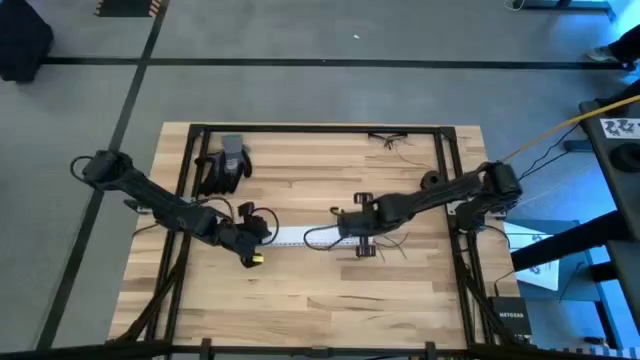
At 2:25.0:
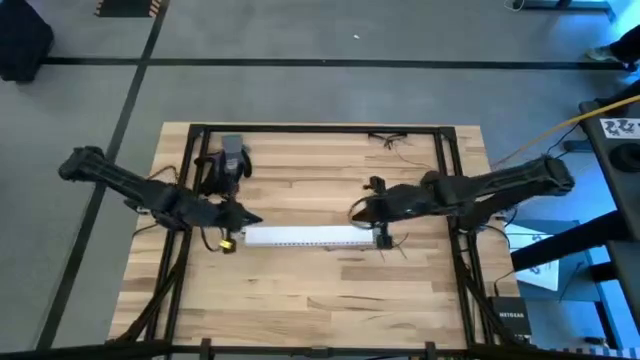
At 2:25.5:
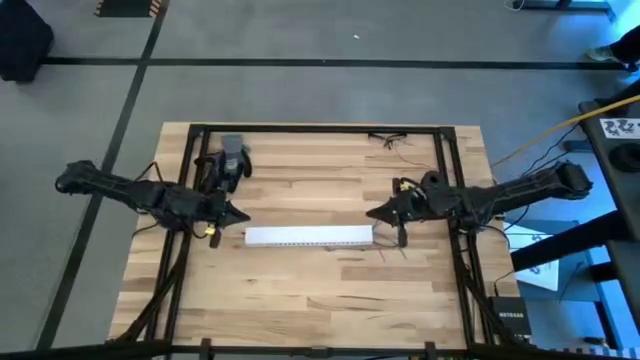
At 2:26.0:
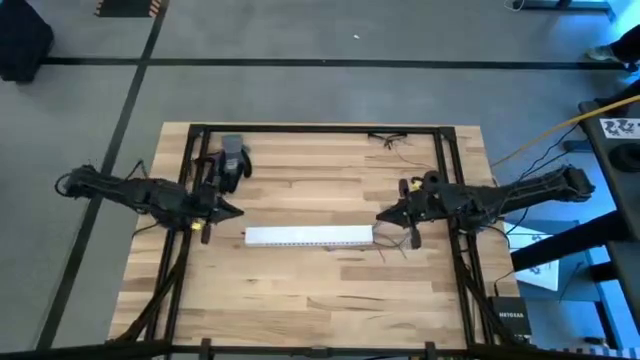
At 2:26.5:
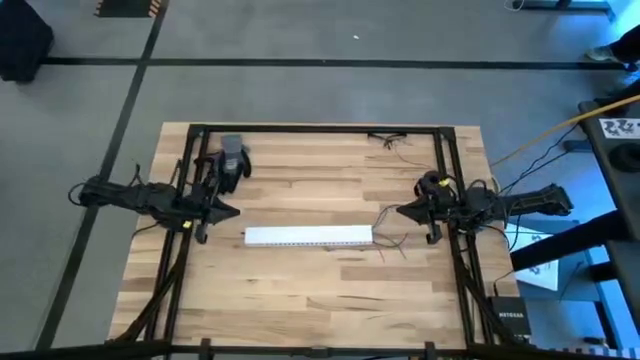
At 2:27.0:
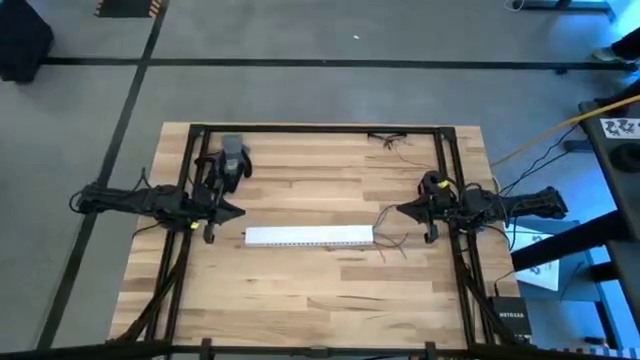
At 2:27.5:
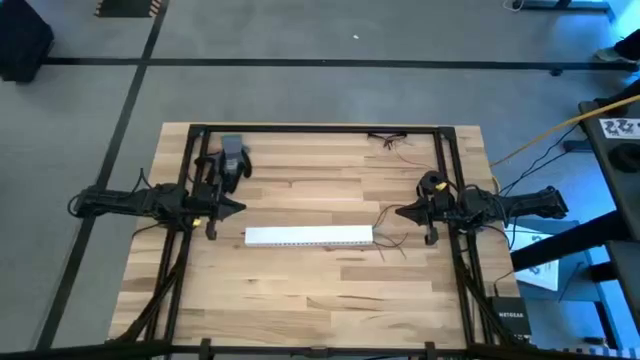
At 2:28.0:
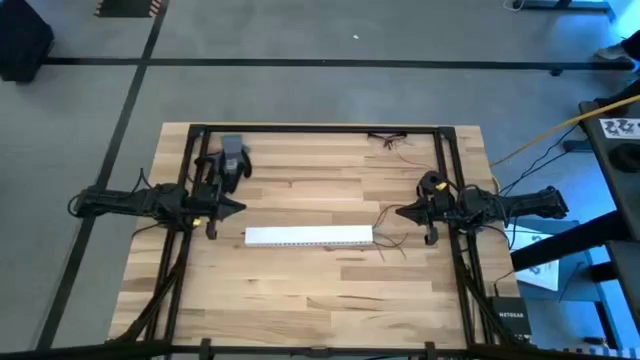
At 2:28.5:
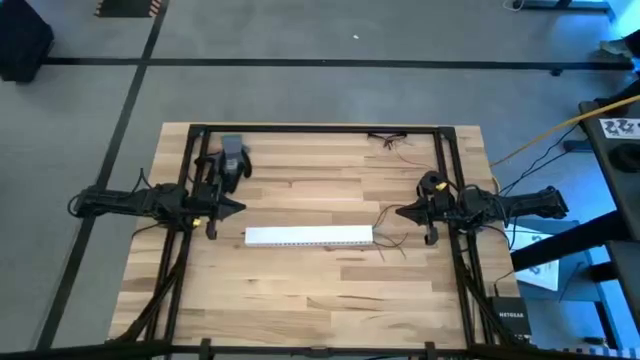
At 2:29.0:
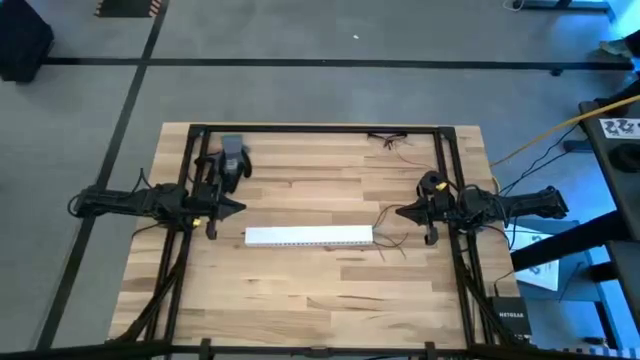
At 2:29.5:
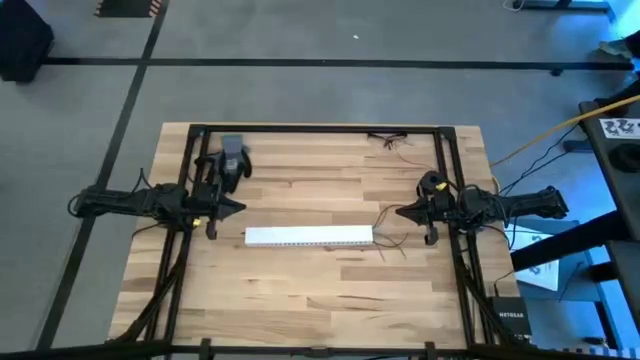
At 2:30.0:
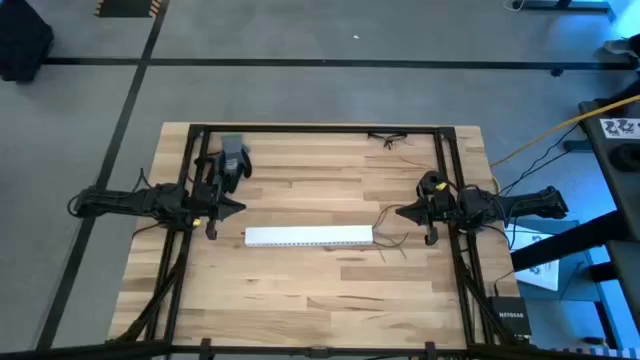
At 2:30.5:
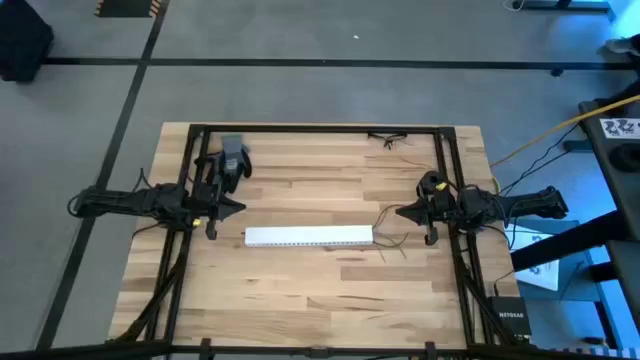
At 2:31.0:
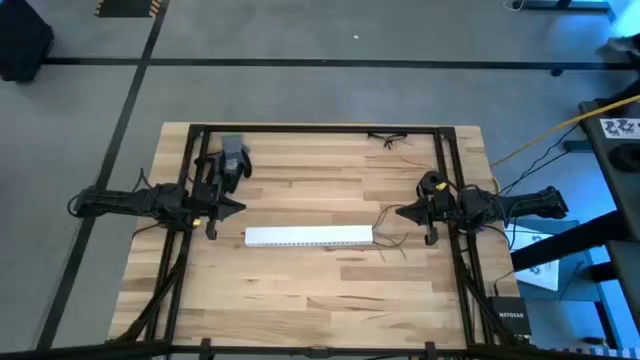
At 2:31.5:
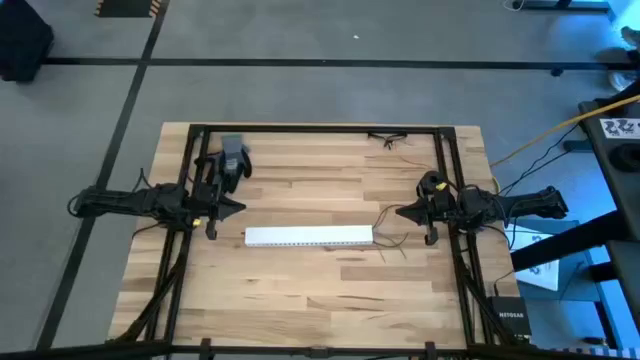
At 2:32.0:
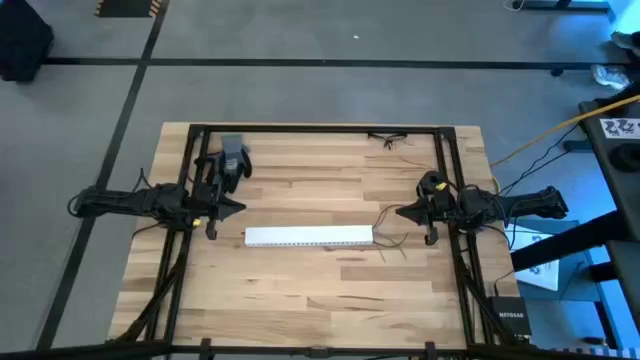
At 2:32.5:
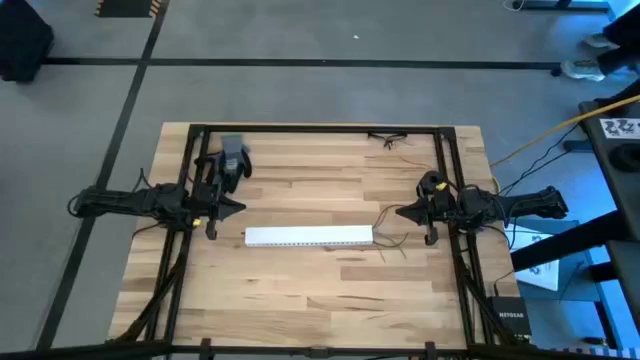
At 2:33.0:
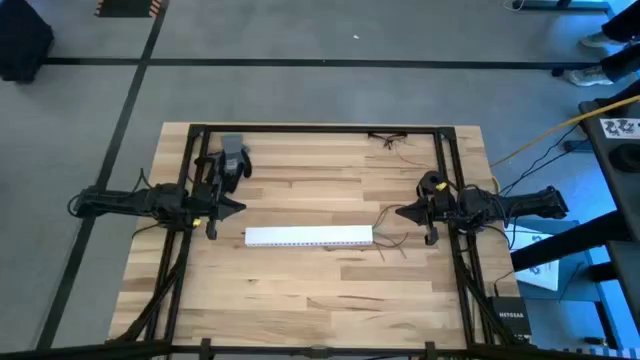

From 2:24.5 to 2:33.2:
Task: Ziptie cables
Return to Home Position

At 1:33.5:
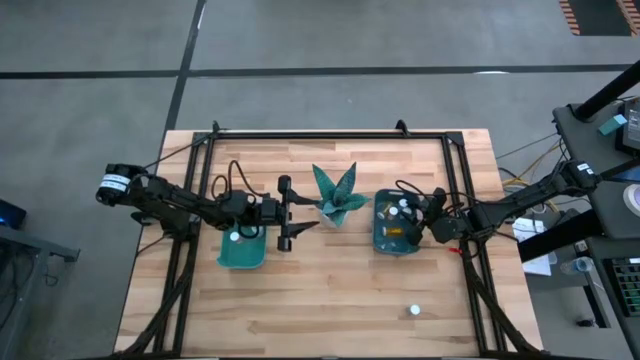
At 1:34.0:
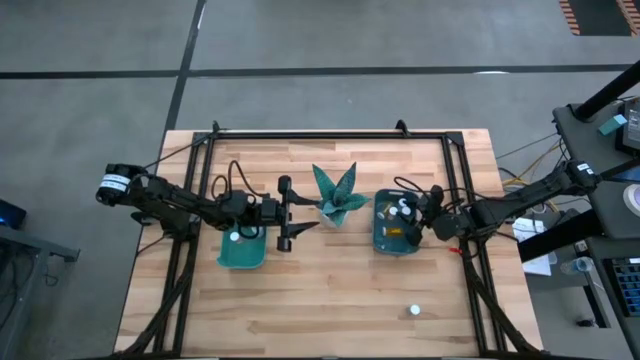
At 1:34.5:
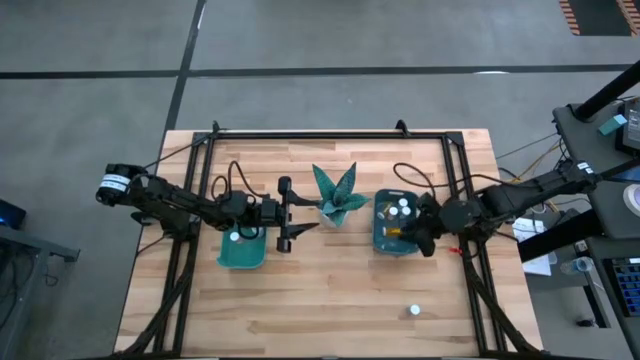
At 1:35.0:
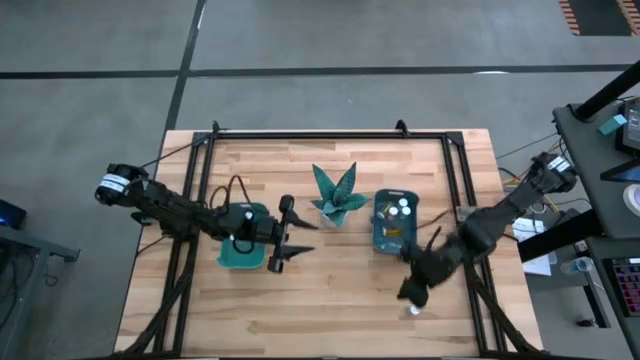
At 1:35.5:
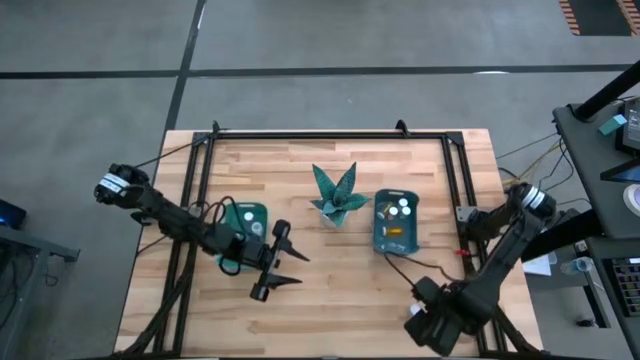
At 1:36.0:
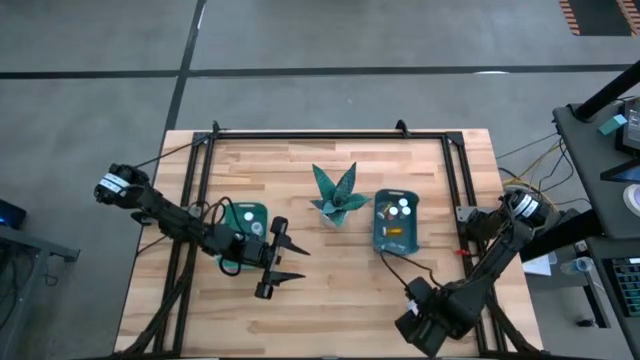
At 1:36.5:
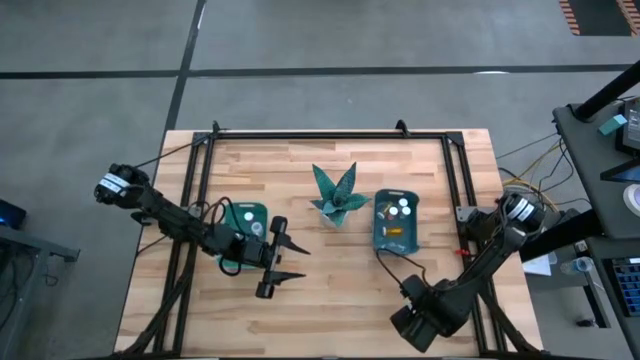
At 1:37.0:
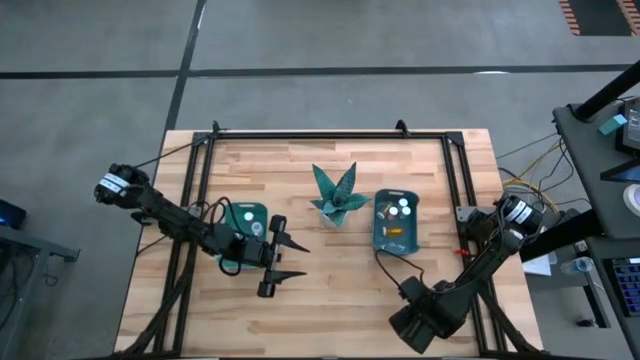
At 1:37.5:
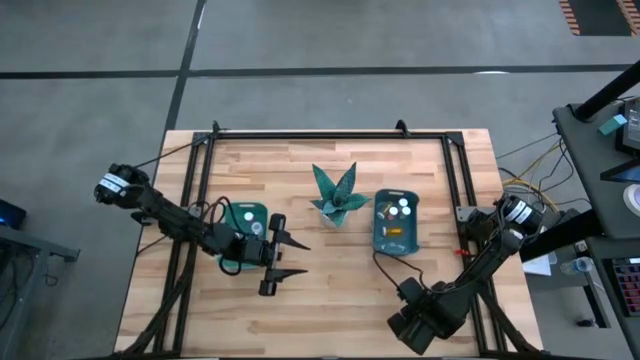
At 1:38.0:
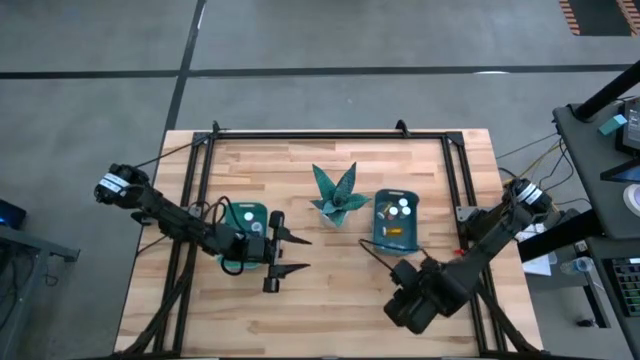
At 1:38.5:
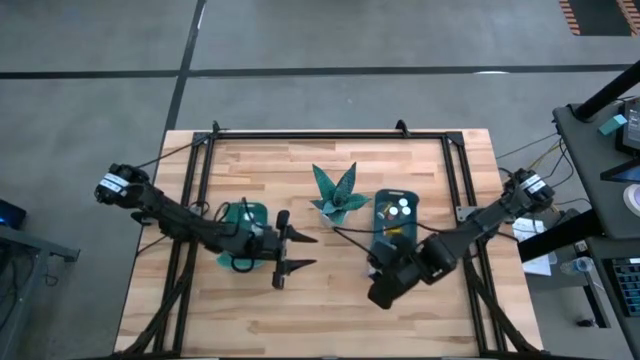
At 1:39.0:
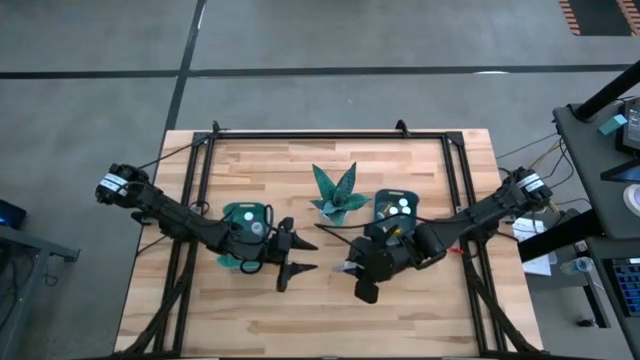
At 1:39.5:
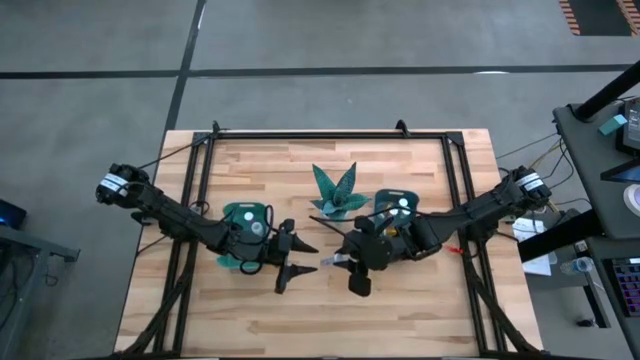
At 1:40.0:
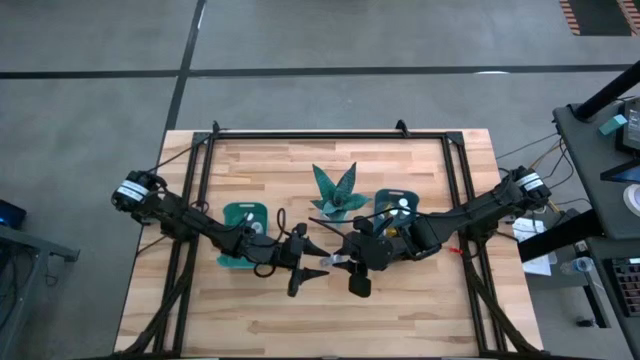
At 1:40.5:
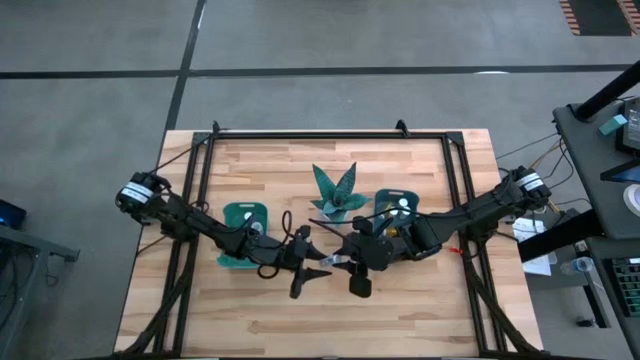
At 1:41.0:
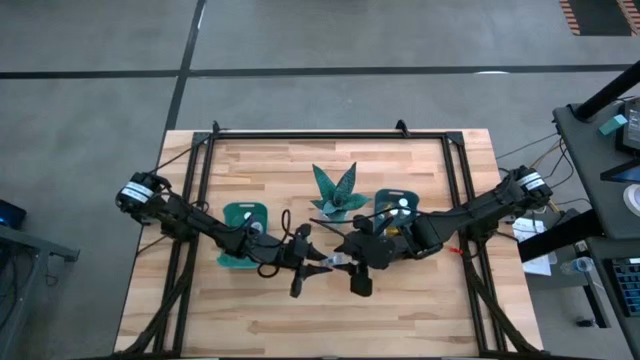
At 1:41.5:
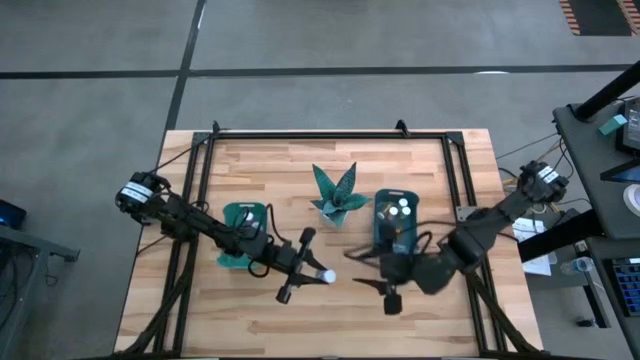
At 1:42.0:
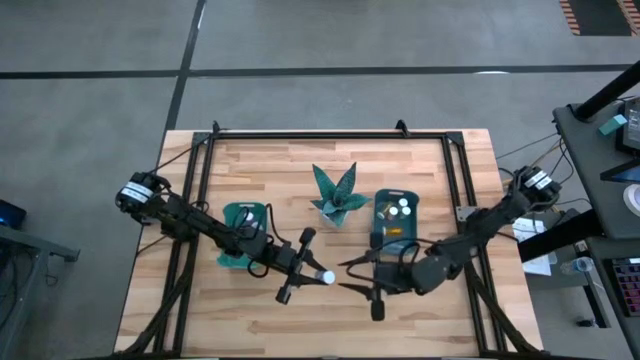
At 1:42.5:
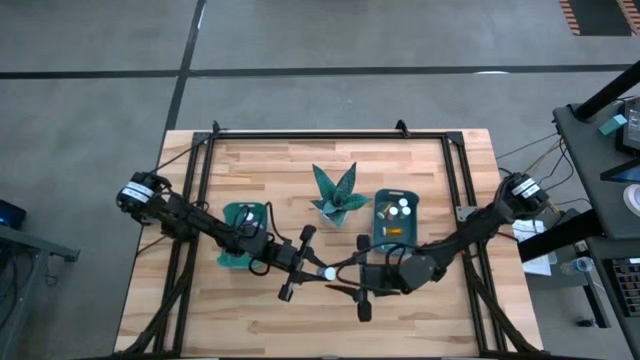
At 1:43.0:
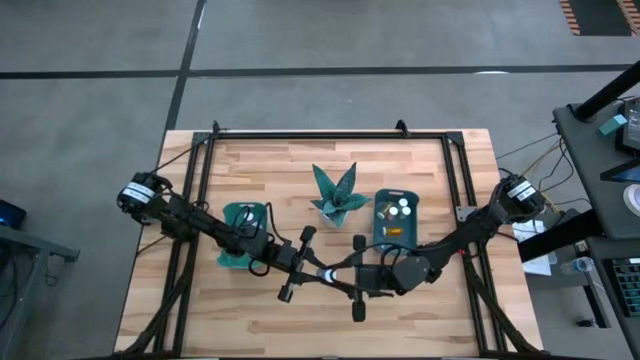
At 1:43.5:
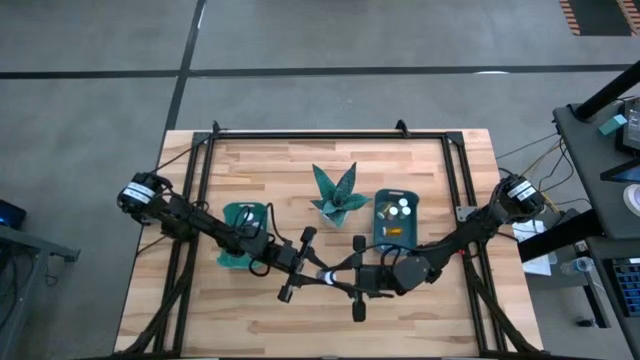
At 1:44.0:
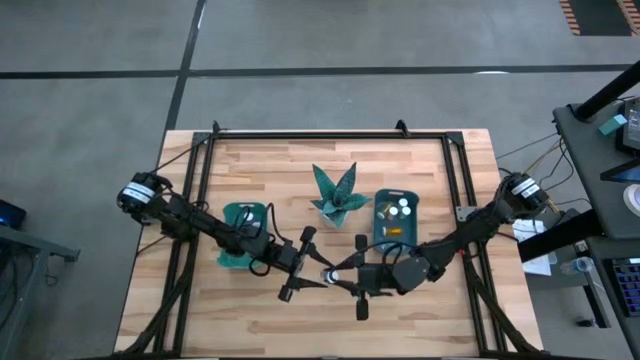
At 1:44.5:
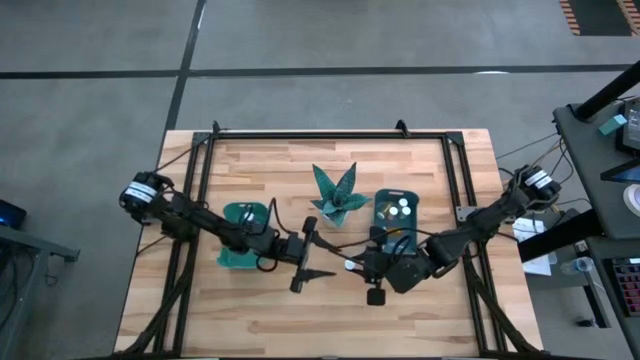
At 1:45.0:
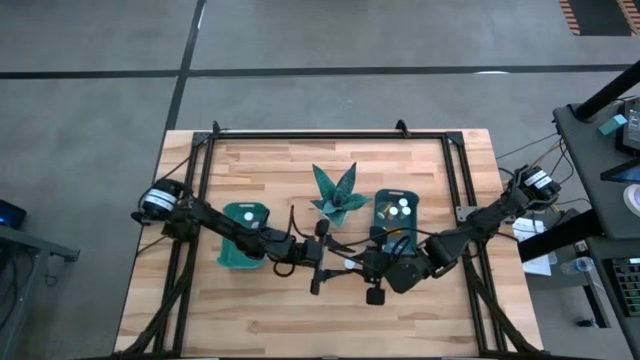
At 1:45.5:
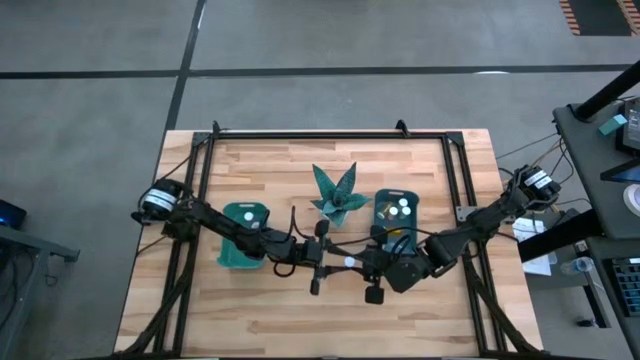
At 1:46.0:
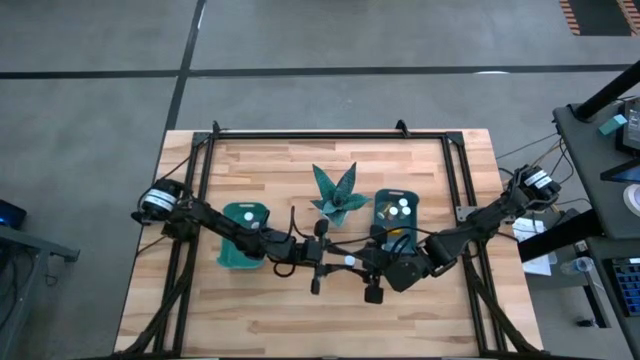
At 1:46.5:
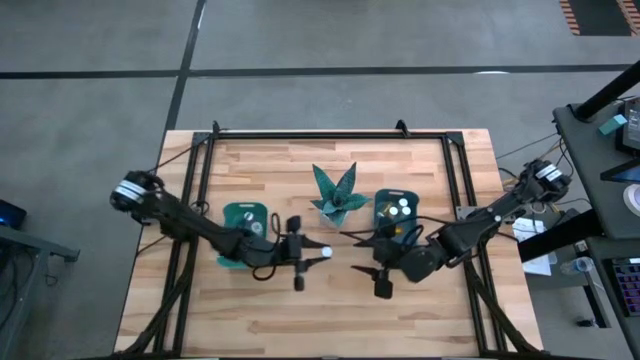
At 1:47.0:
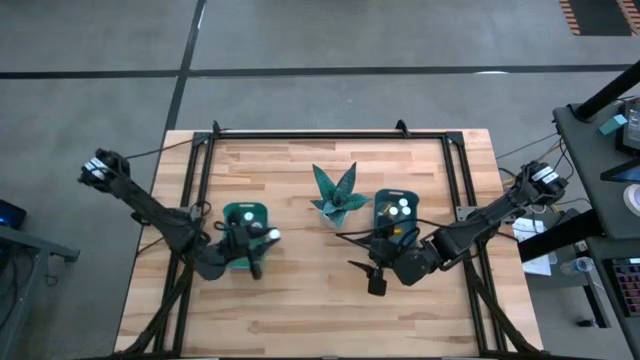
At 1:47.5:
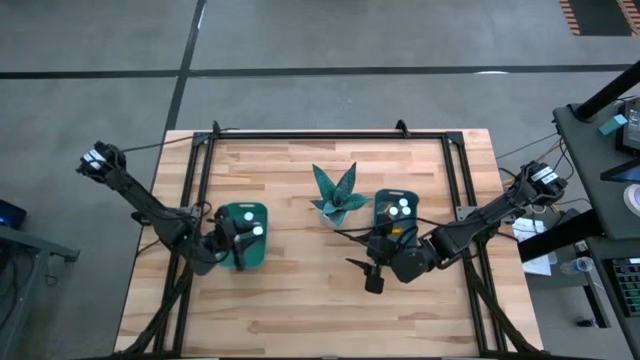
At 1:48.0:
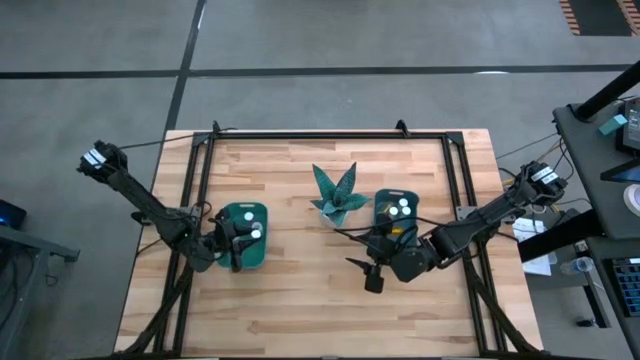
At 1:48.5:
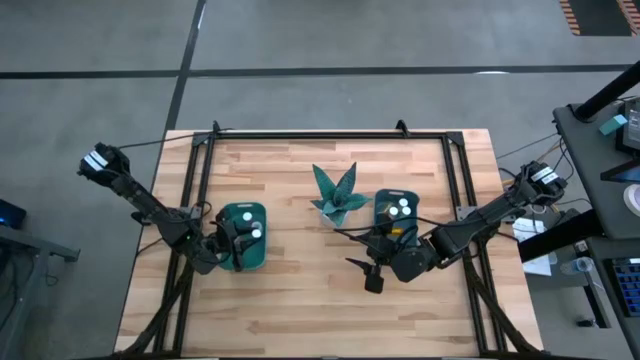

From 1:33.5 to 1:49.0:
Task: Pick and place medicine bottles into bin by pill shape (circle, oval)
Put the blue capsule bottle into the green bin
